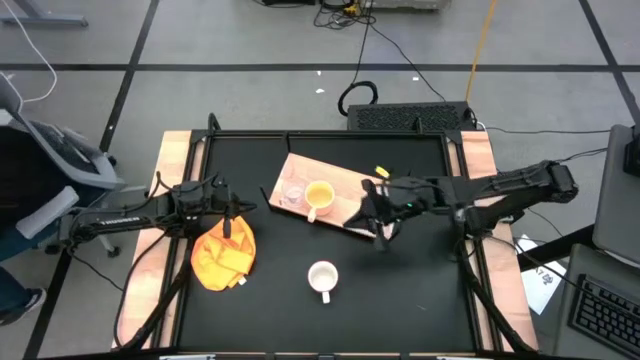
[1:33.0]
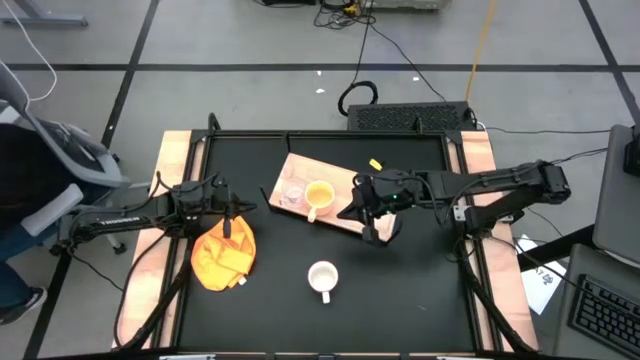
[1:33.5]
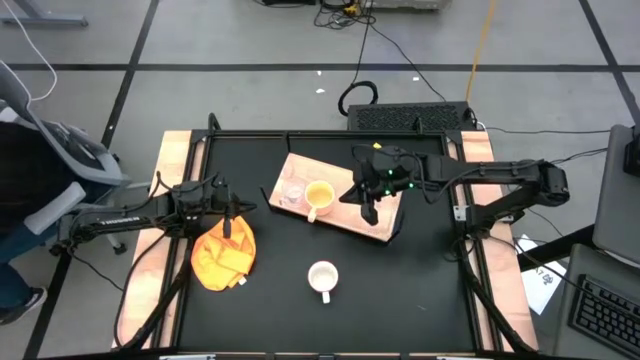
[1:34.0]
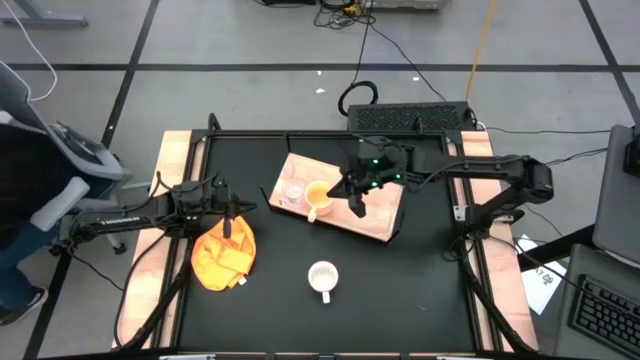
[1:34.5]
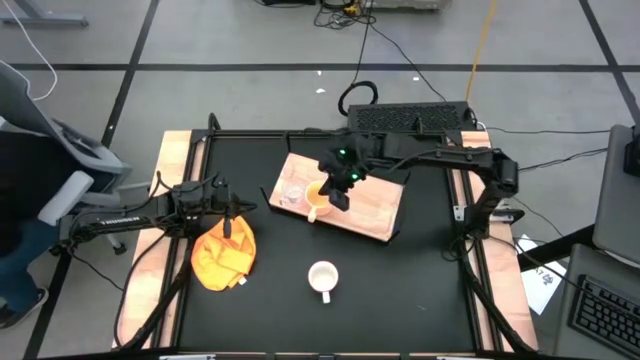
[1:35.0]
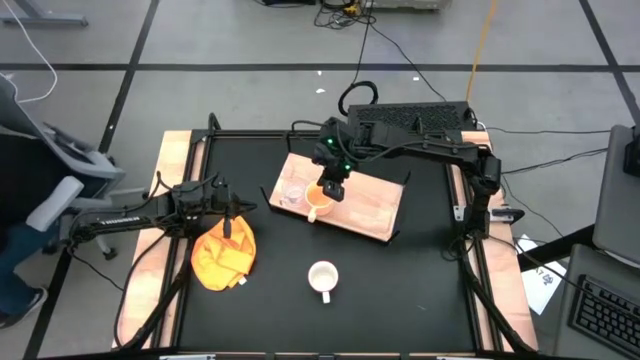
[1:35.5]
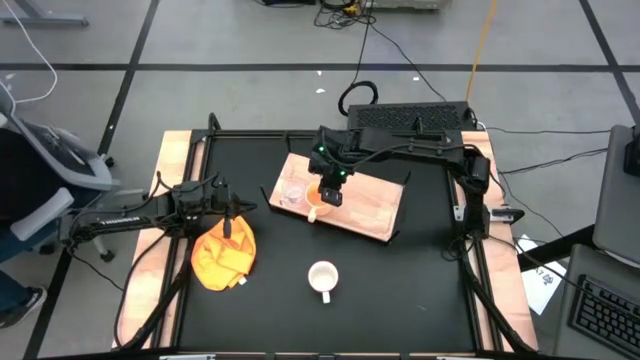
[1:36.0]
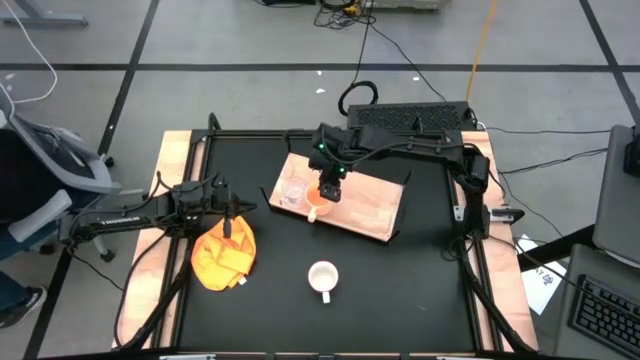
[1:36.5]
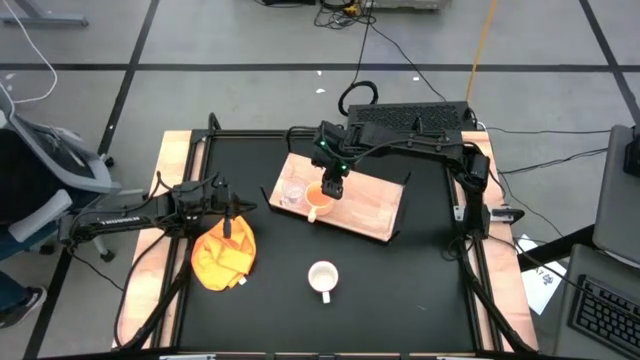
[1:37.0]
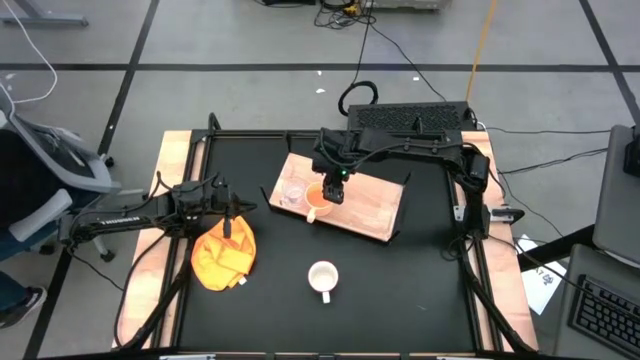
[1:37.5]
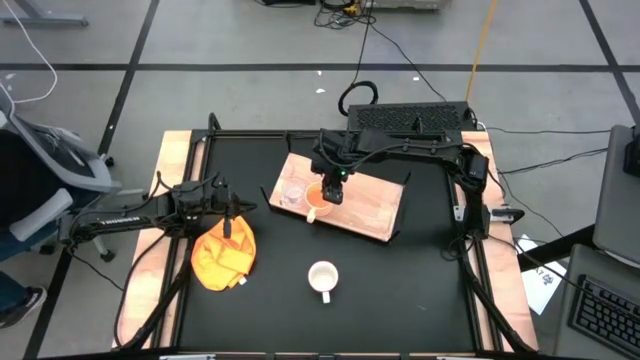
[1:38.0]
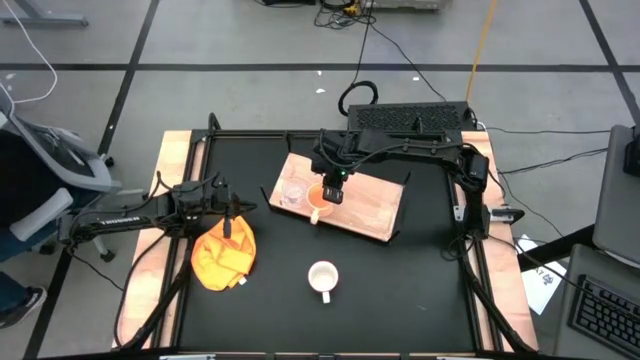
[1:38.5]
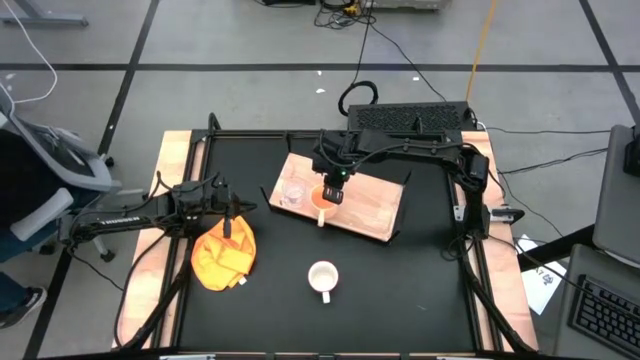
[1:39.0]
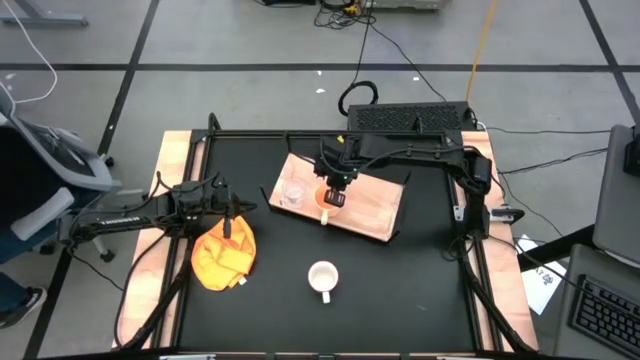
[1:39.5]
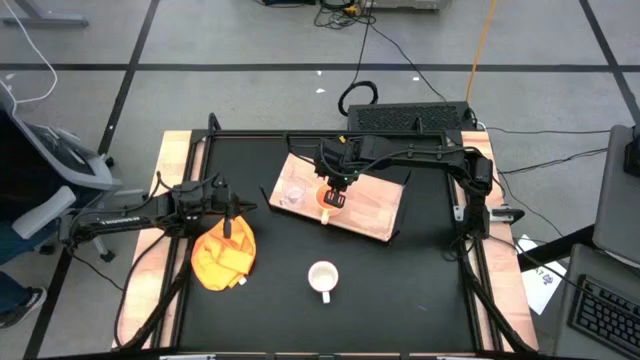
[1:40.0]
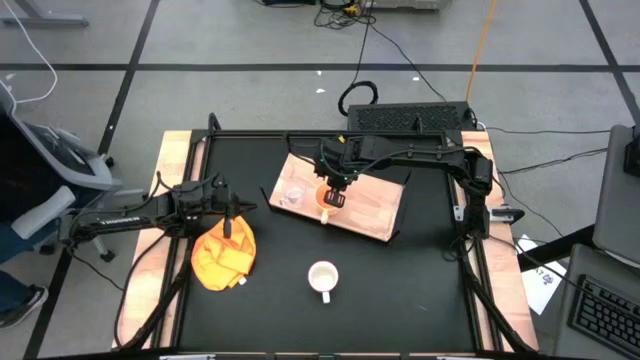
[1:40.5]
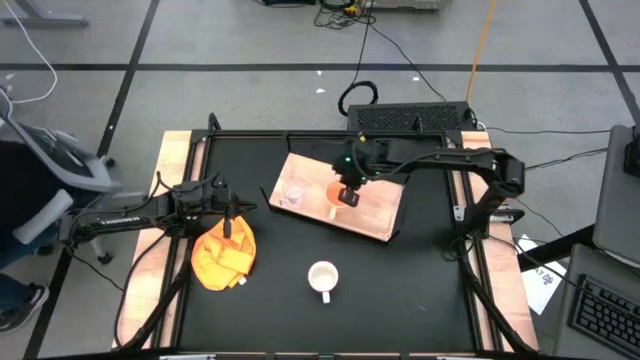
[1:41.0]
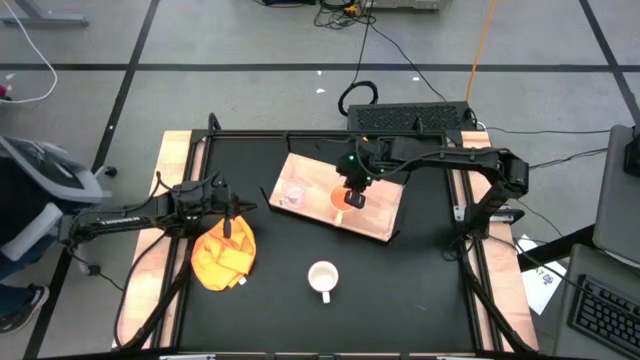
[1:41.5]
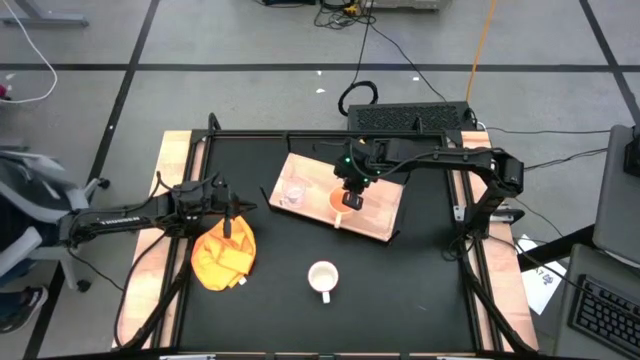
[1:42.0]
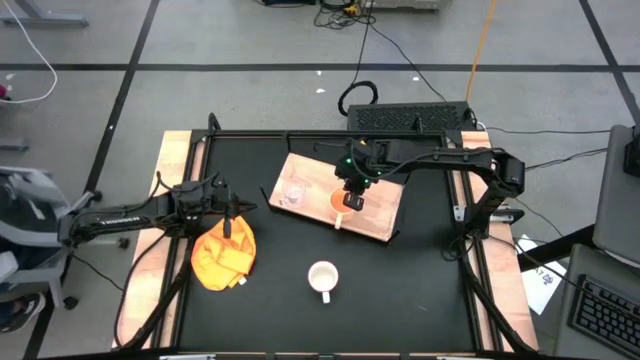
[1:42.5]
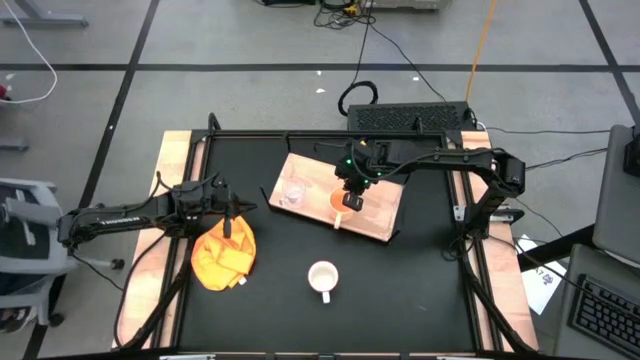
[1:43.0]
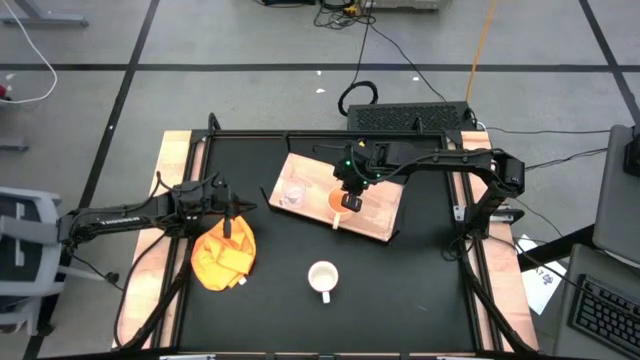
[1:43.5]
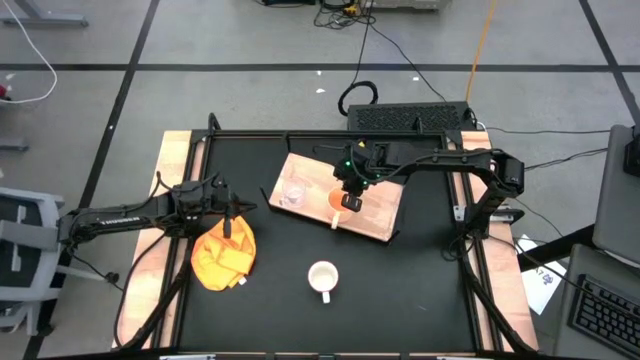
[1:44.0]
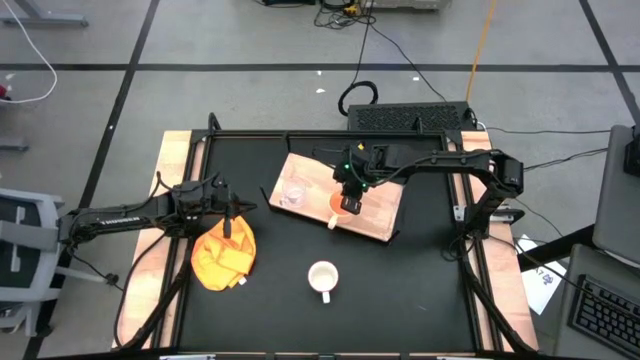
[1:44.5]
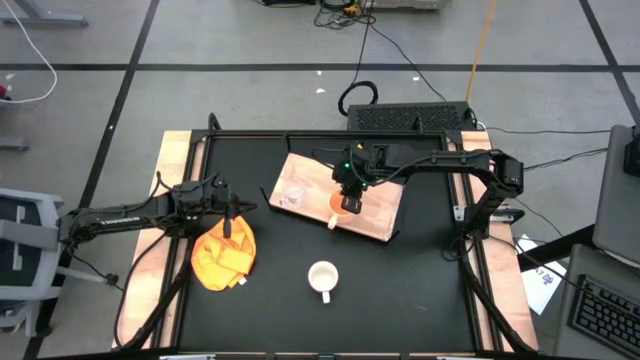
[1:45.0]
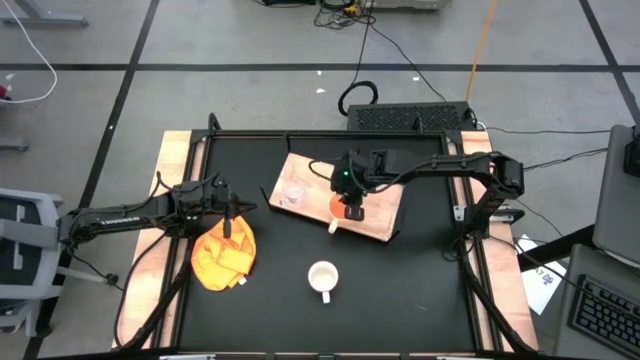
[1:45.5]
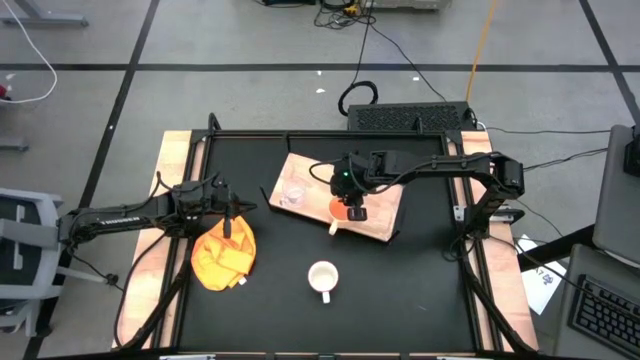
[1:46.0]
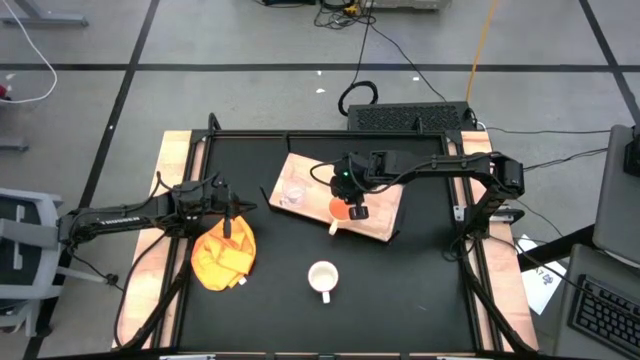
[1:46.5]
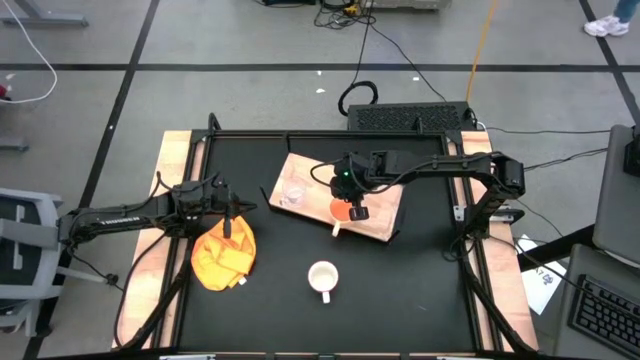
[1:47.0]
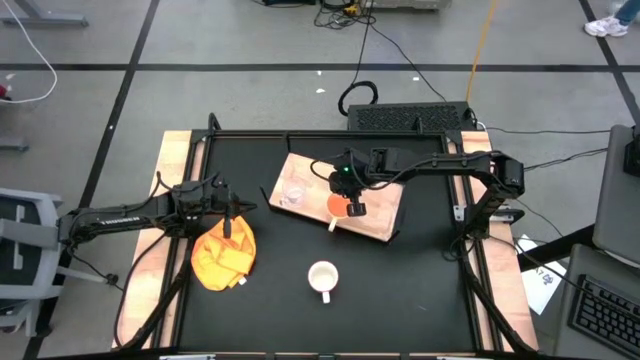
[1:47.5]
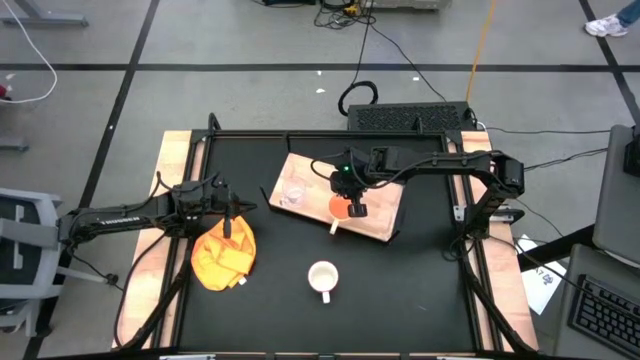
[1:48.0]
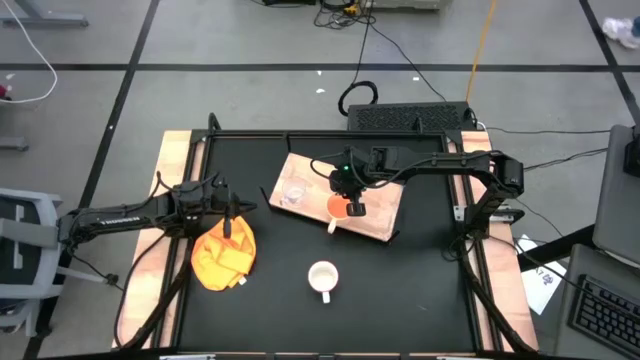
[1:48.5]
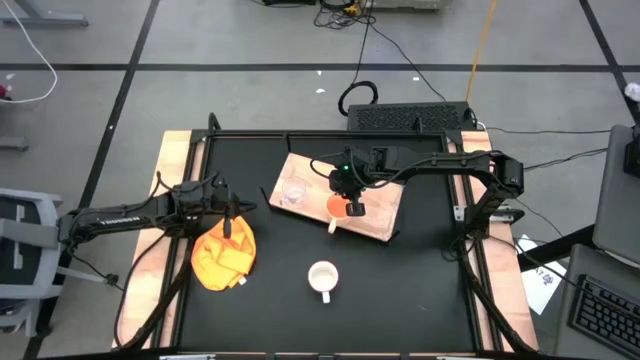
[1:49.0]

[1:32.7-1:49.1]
Task: Stack small to large cups/mugs on shelf
Put the light orange mug on the shelf
